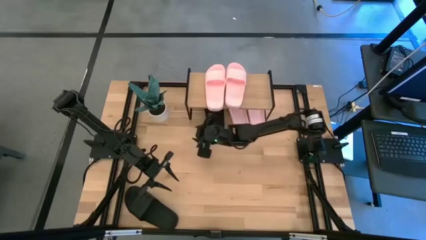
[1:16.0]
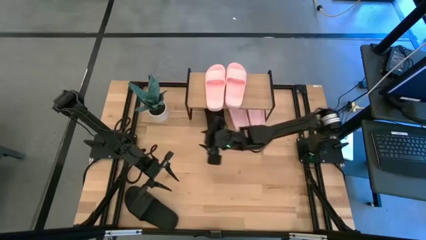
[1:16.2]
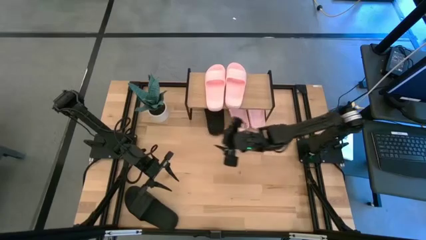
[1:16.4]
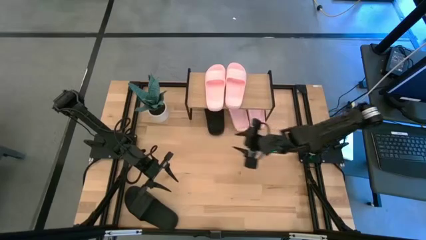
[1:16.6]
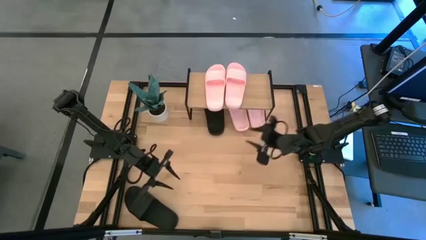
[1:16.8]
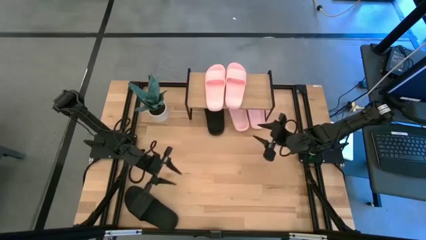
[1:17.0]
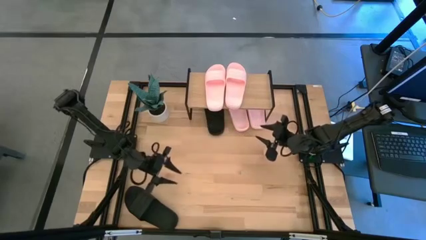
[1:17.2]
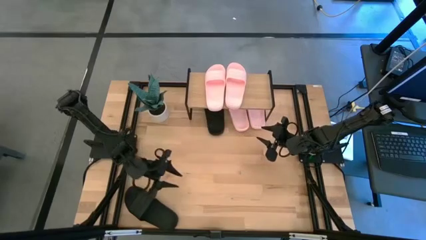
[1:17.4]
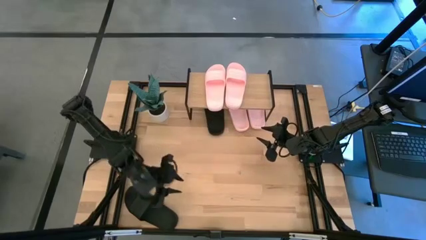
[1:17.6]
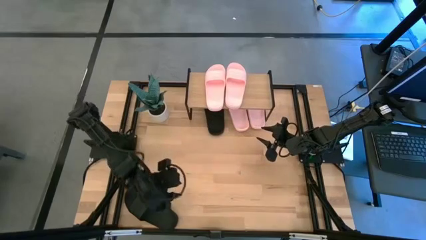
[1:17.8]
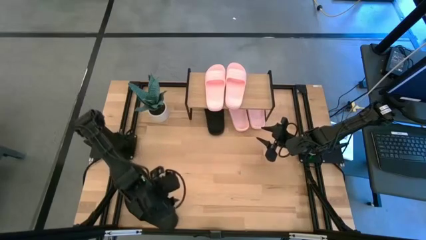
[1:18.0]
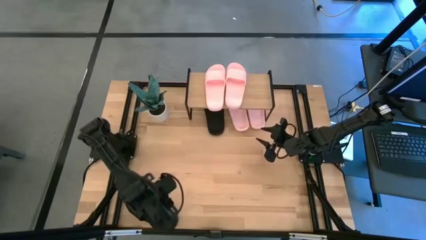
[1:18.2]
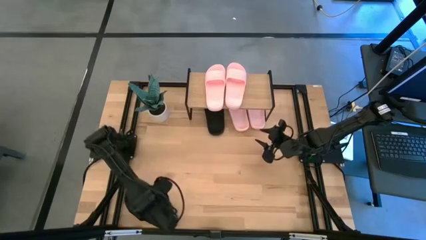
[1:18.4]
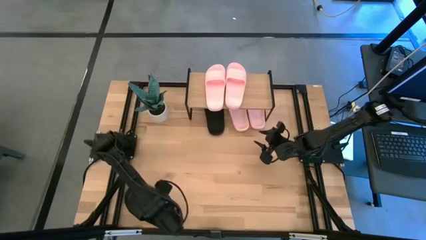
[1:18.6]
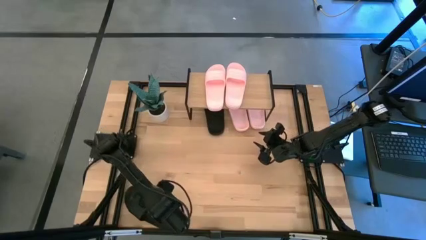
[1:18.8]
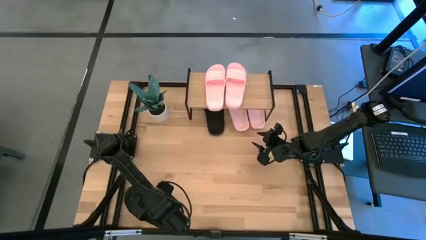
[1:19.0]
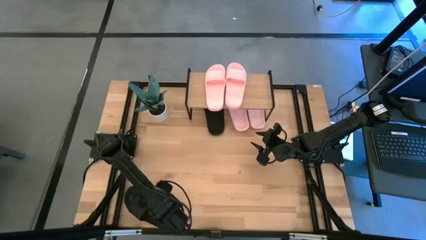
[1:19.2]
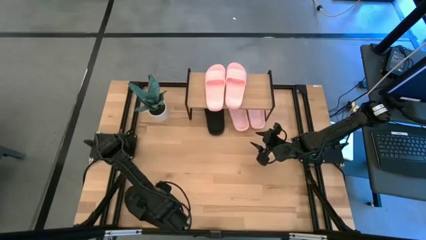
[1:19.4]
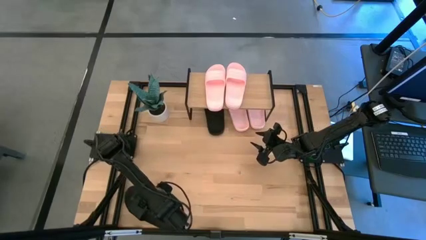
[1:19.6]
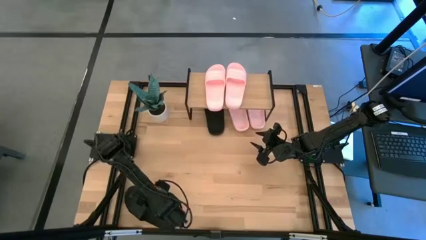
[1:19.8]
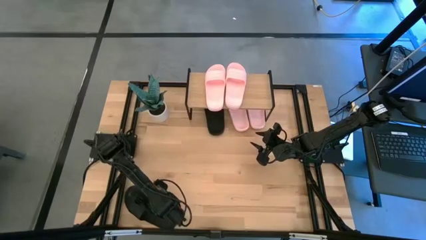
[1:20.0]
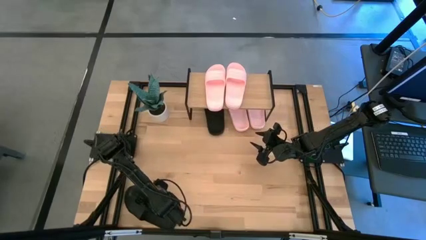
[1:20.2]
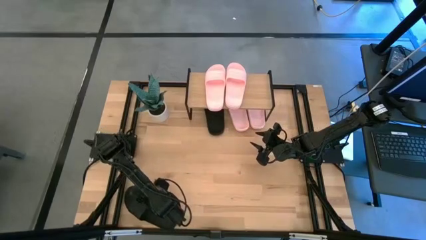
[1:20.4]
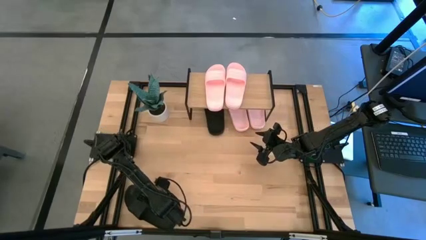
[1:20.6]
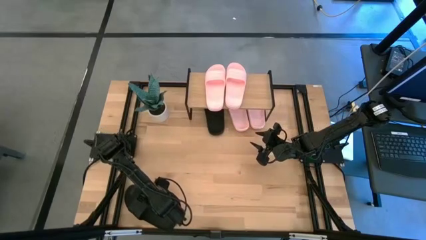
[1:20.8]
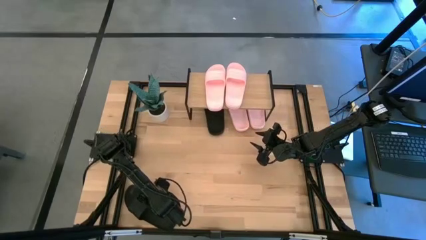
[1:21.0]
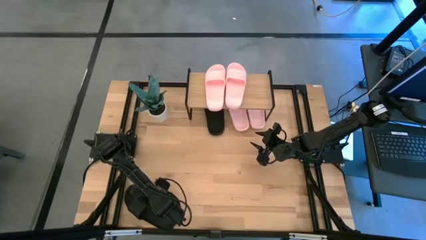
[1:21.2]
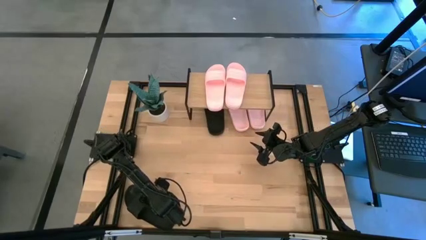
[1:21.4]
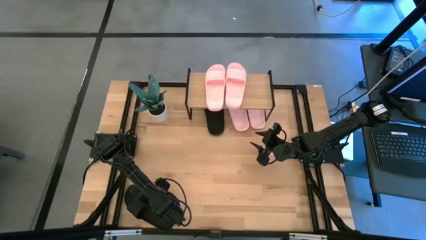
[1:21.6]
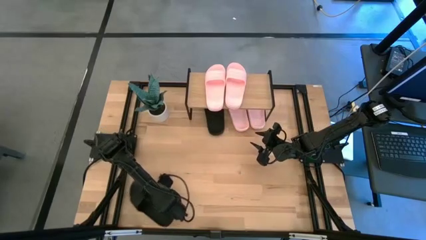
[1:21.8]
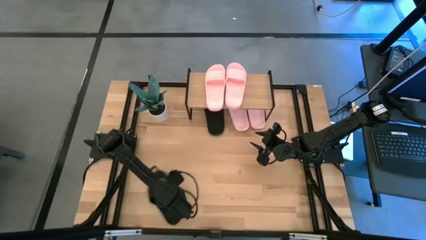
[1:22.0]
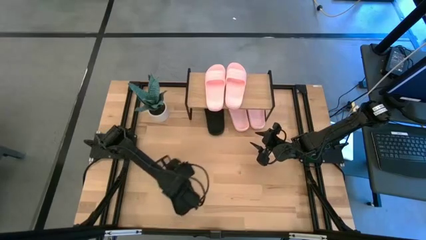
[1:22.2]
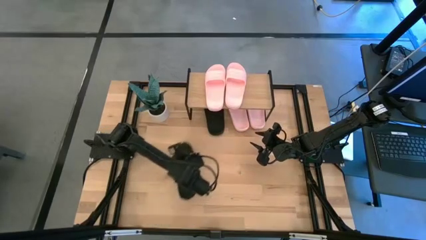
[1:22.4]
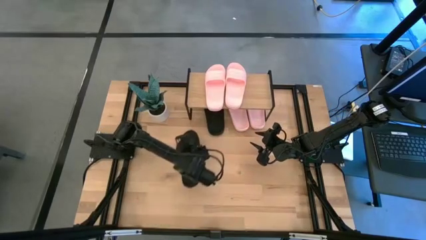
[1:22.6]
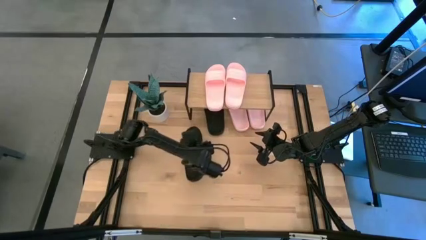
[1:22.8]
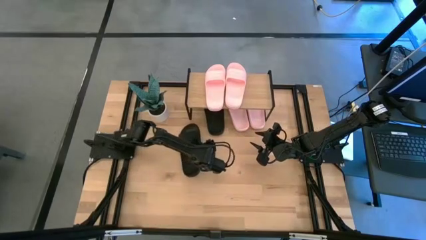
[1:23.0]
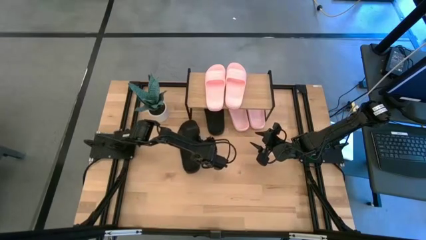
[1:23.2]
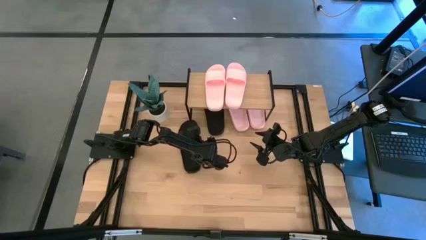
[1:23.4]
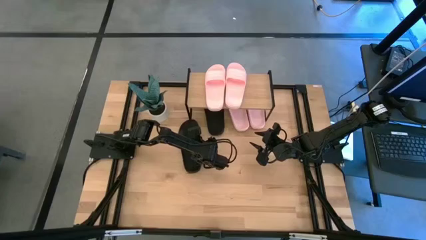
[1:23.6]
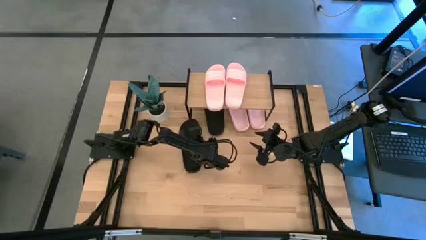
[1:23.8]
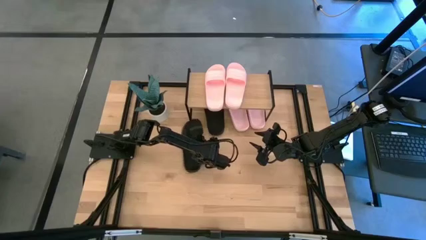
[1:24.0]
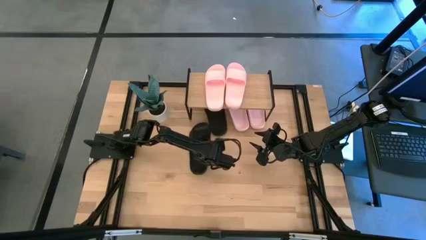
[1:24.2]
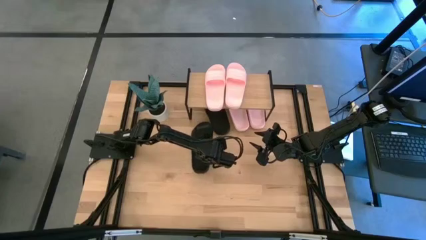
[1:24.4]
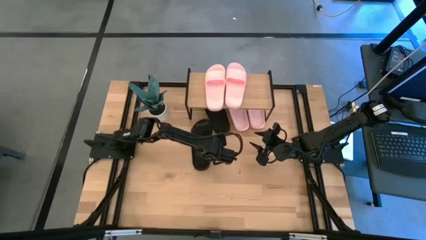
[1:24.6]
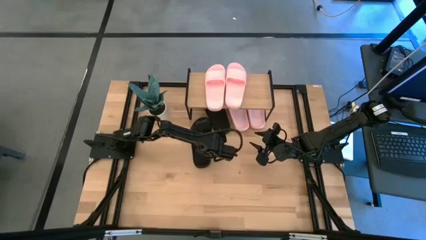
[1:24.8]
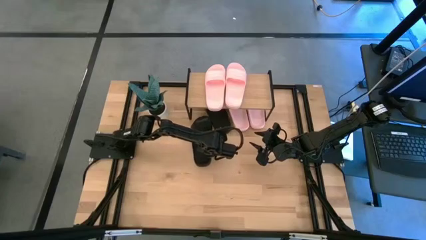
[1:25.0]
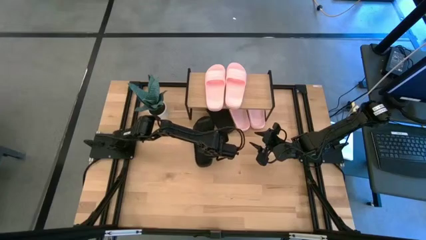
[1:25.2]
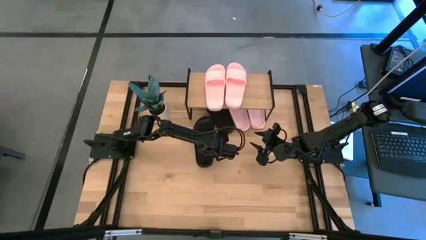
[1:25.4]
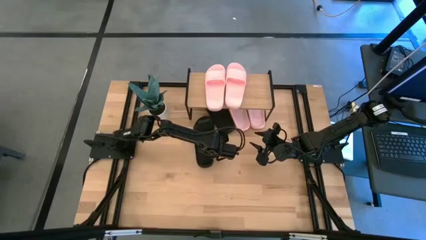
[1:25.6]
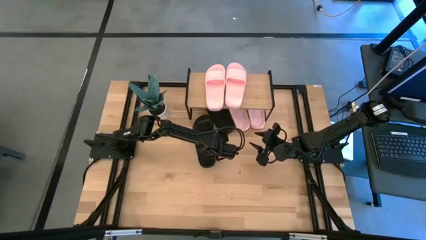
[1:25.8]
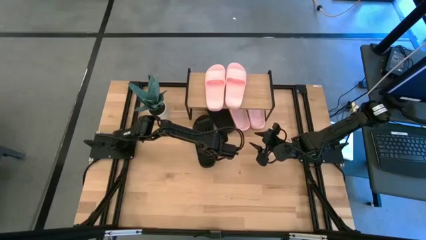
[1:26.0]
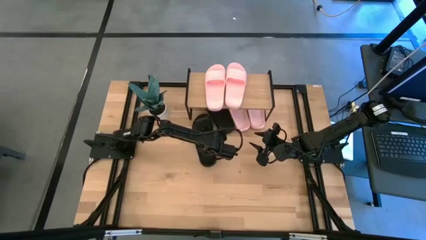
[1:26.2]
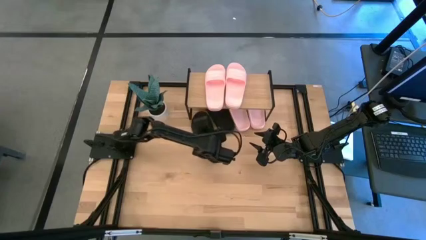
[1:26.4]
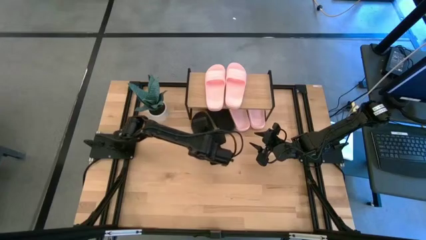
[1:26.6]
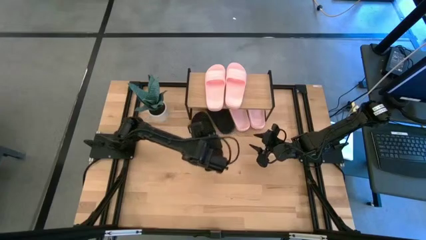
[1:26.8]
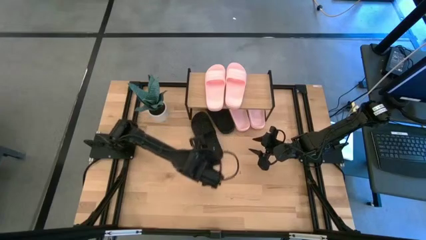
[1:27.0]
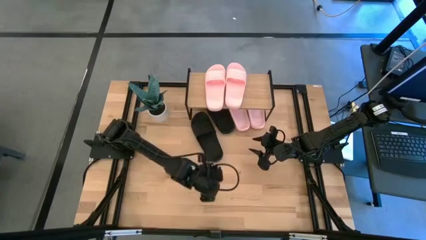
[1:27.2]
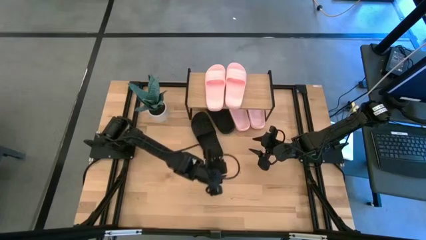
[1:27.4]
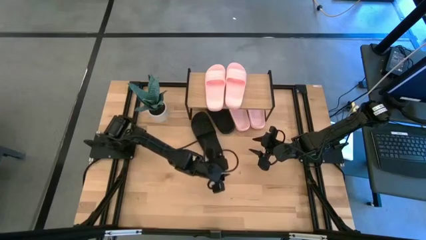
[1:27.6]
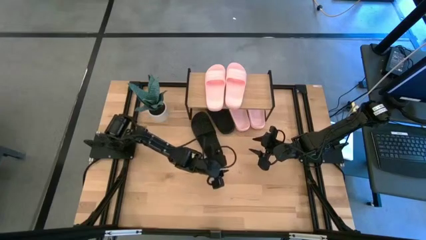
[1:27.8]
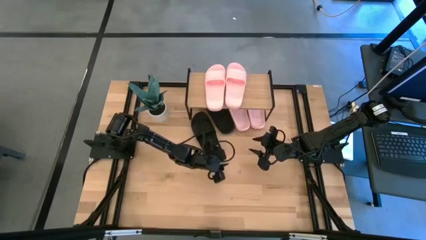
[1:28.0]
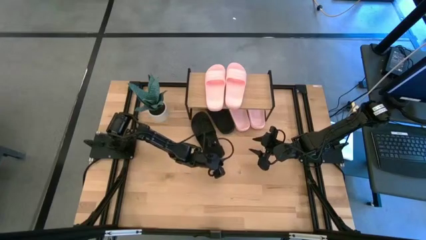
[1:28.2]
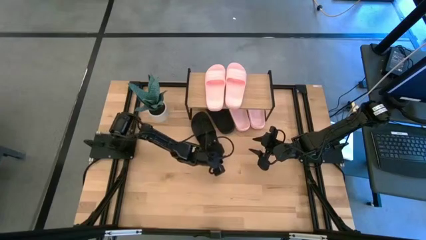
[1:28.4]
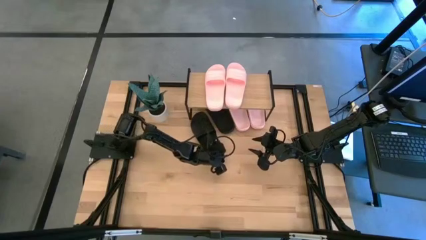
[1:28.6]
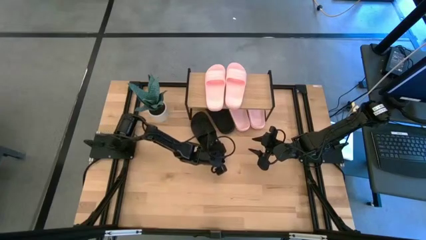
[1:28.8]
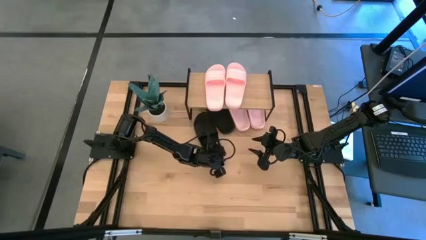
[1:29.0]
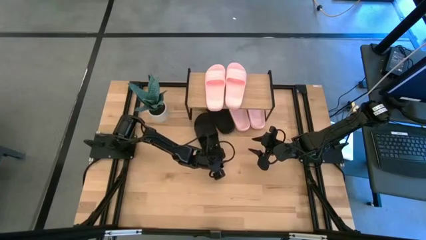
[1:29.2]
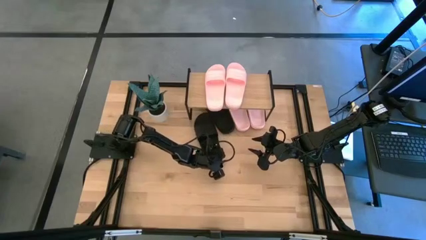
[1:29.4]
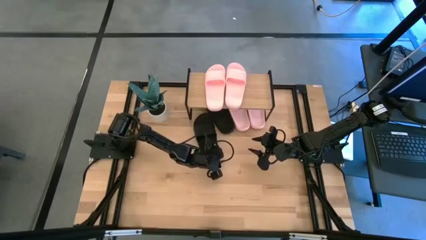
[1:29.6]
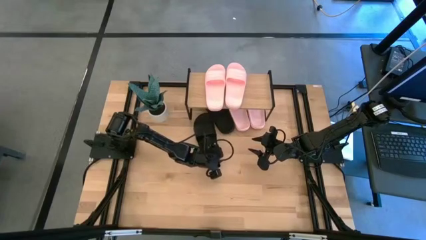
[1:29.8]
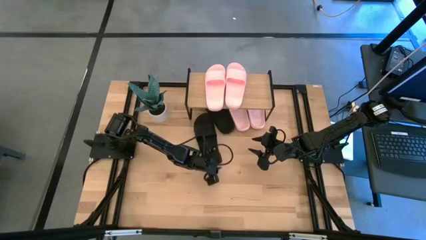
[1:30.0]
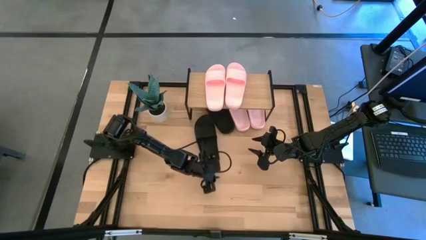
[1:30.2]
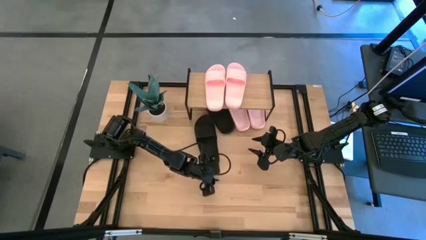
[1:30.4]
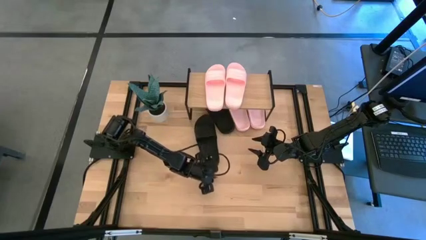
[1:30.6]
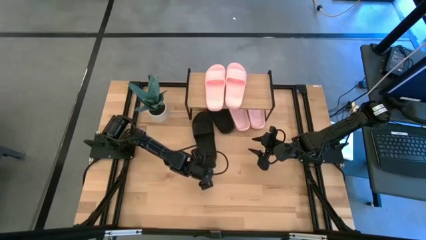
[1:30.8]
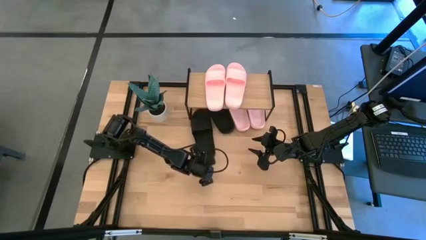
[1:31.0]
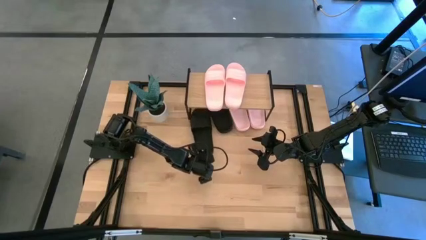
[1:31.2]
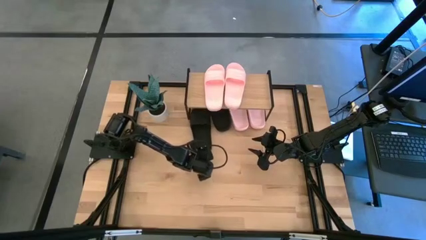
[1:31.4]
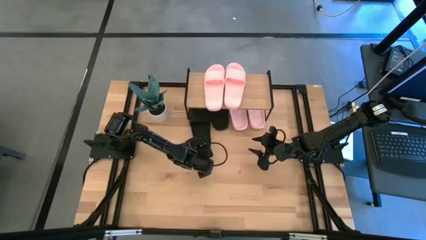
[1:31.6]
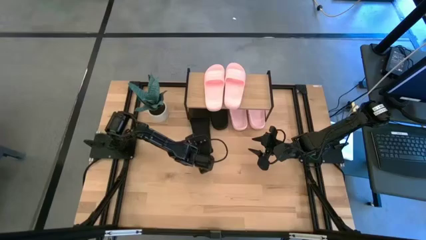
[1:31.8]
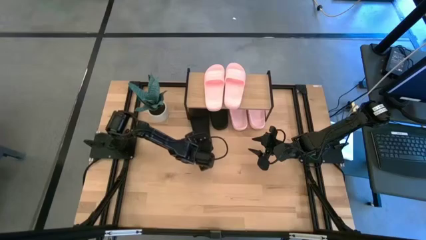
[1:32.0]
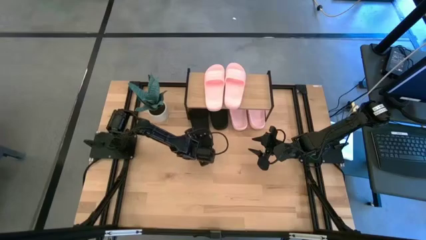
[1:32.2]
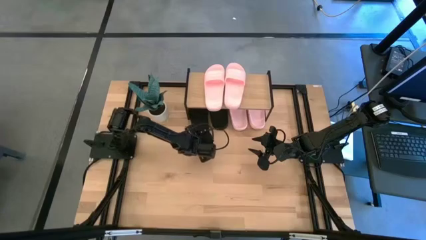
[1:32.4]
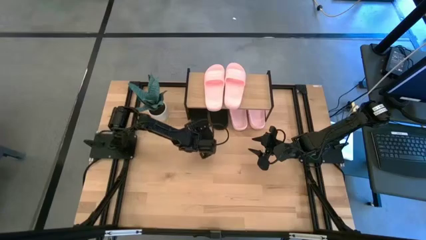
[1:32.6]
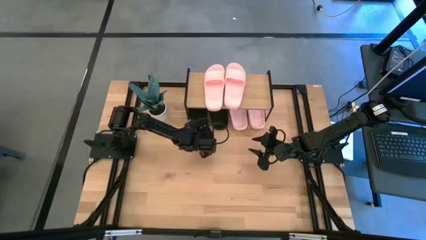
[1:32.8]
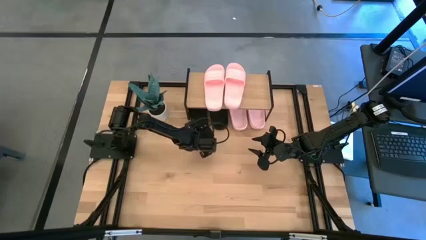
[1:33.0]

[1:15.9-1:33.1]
Task: Pick and place slides into the shelf
Put the black slipper under the shelf
